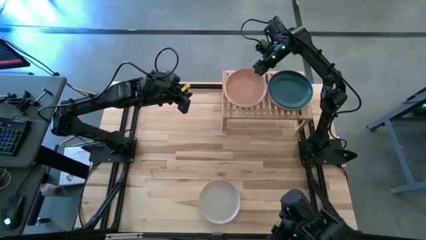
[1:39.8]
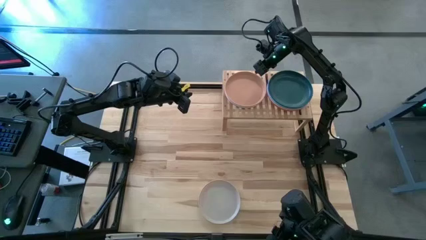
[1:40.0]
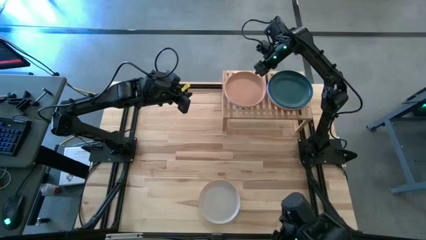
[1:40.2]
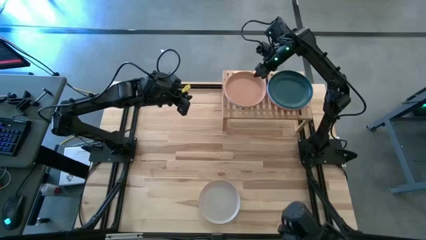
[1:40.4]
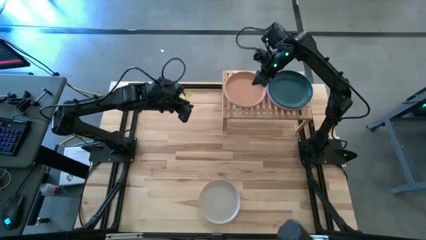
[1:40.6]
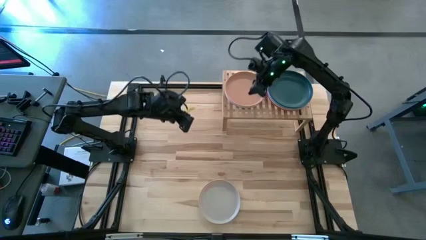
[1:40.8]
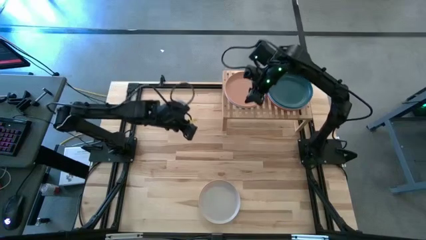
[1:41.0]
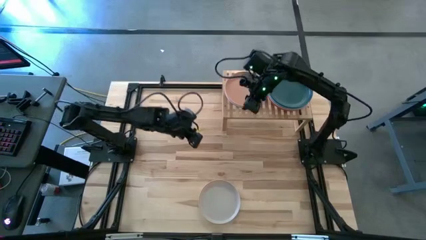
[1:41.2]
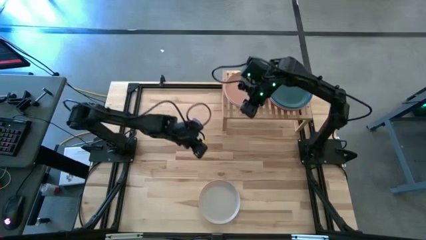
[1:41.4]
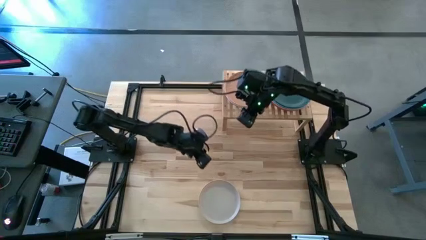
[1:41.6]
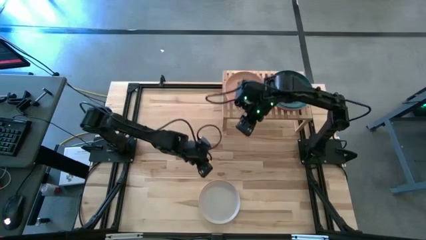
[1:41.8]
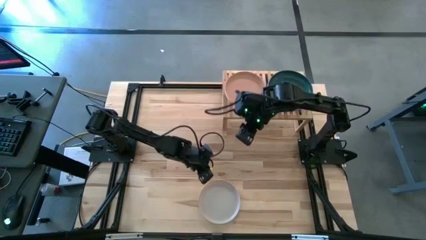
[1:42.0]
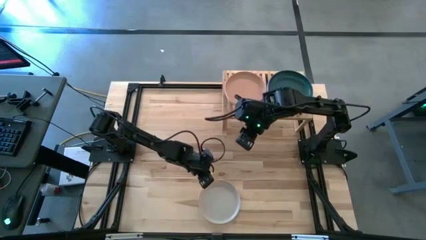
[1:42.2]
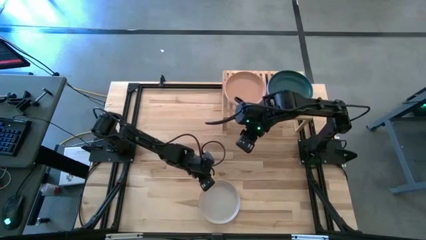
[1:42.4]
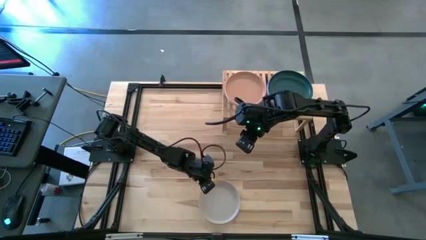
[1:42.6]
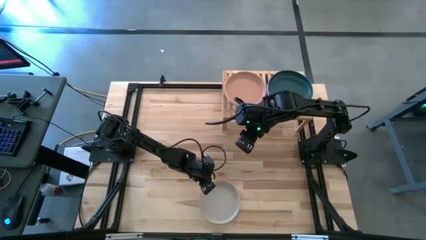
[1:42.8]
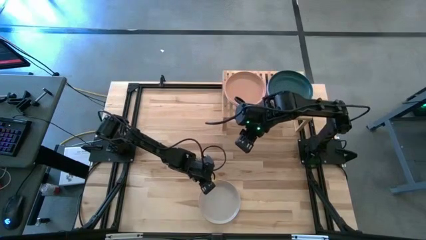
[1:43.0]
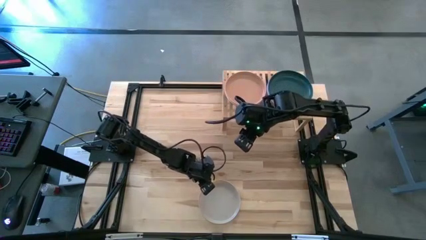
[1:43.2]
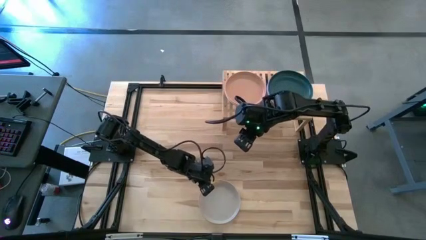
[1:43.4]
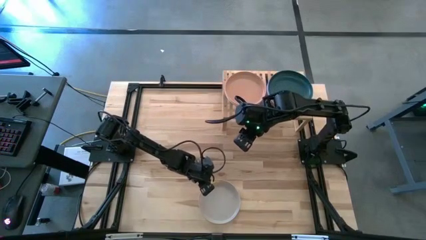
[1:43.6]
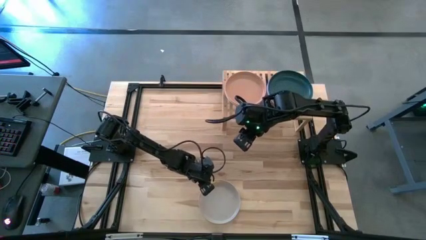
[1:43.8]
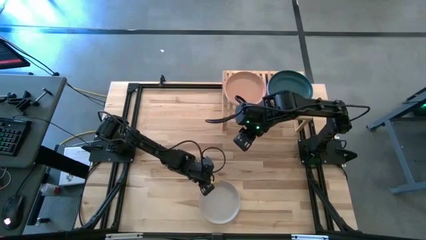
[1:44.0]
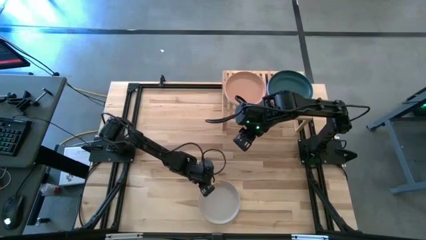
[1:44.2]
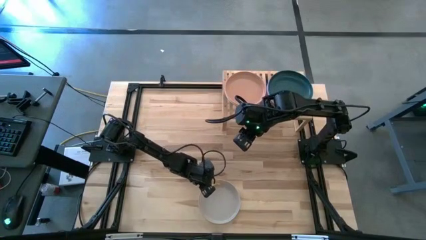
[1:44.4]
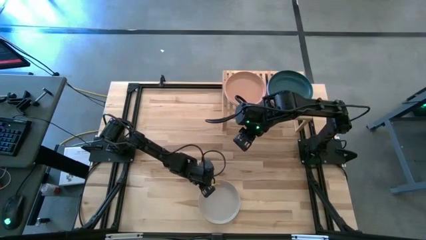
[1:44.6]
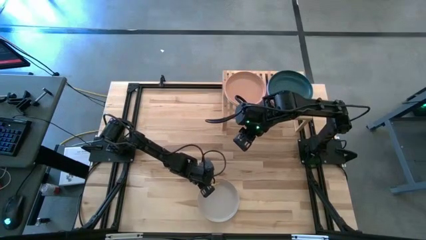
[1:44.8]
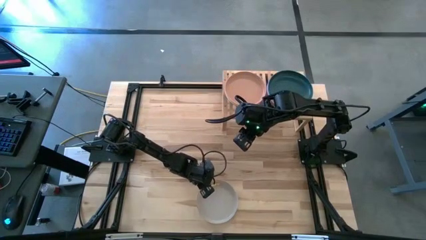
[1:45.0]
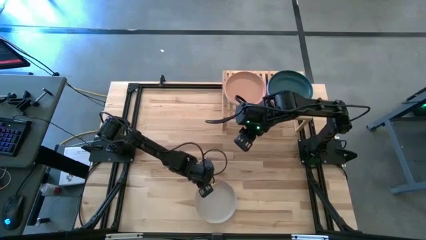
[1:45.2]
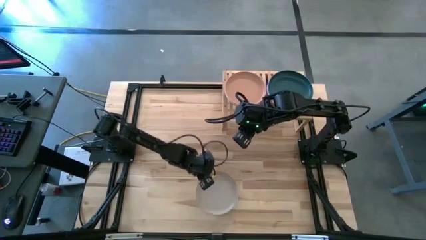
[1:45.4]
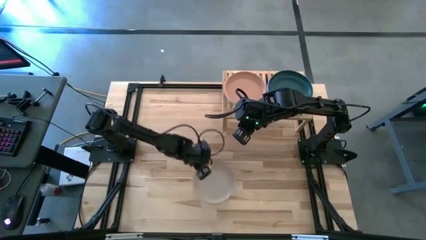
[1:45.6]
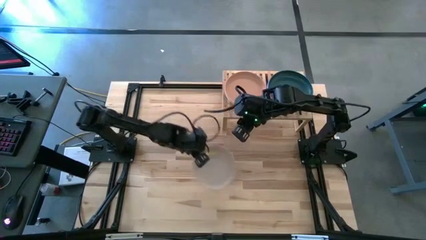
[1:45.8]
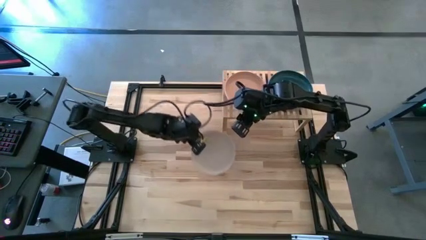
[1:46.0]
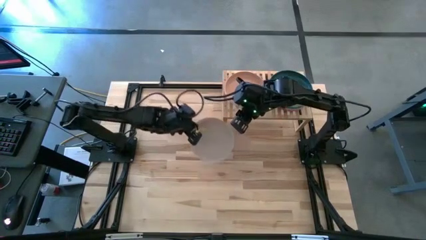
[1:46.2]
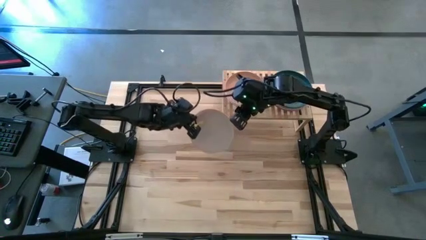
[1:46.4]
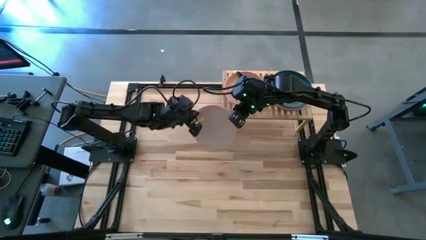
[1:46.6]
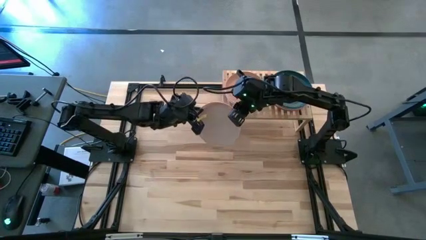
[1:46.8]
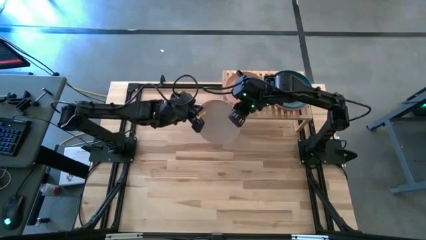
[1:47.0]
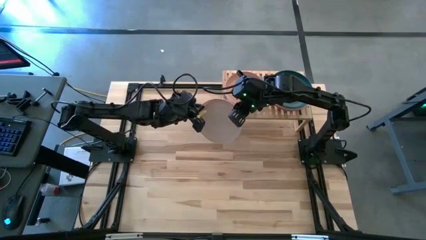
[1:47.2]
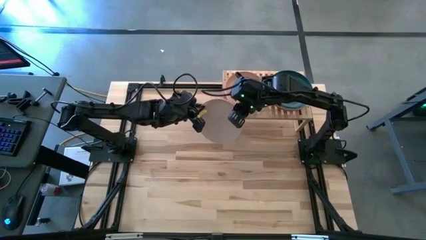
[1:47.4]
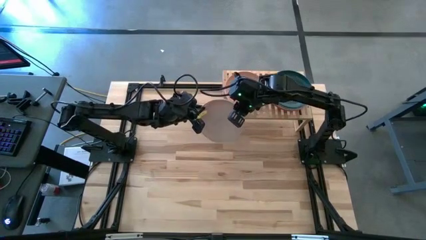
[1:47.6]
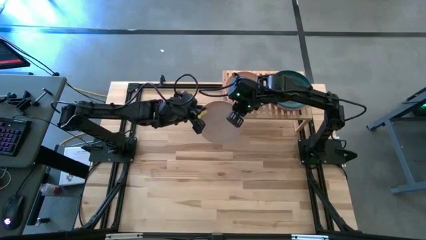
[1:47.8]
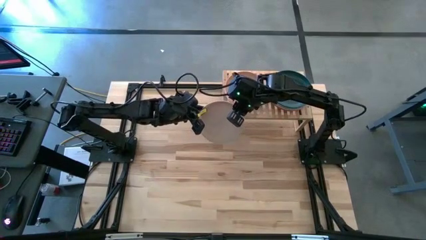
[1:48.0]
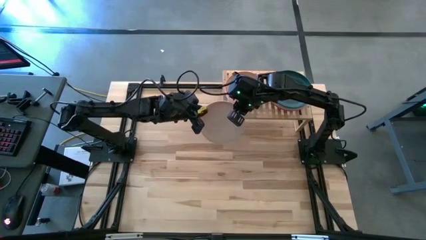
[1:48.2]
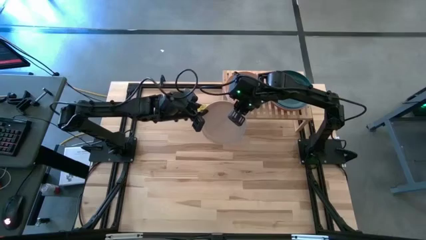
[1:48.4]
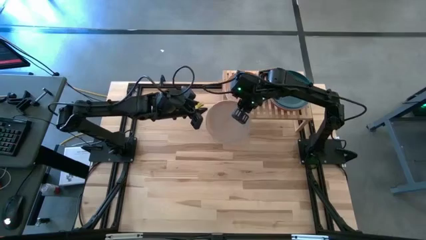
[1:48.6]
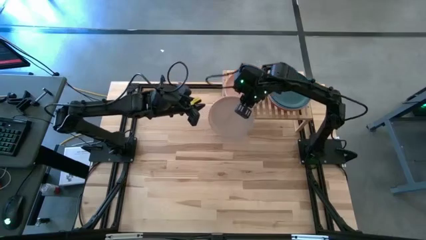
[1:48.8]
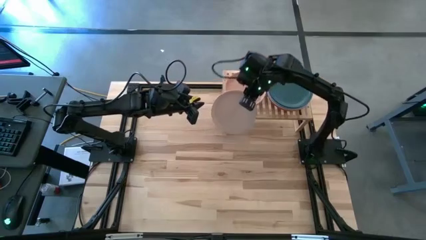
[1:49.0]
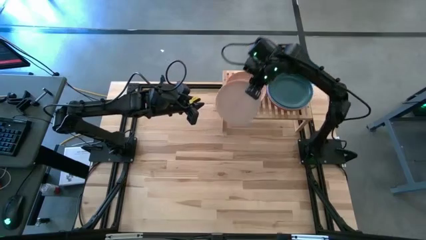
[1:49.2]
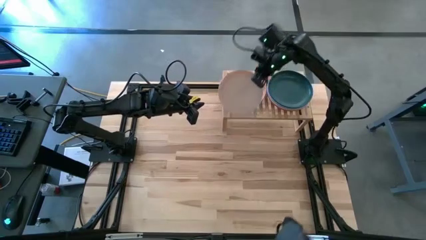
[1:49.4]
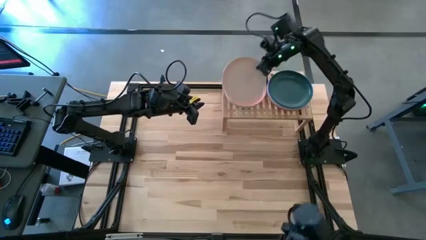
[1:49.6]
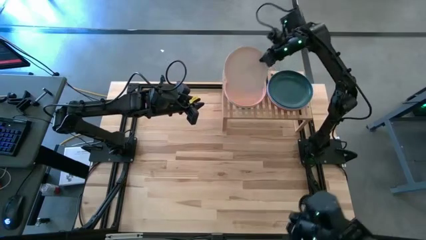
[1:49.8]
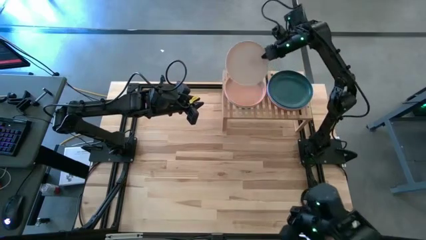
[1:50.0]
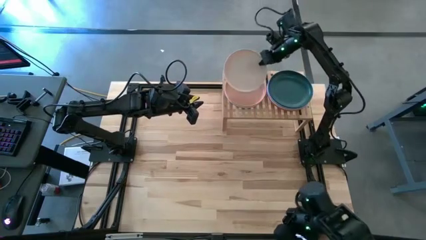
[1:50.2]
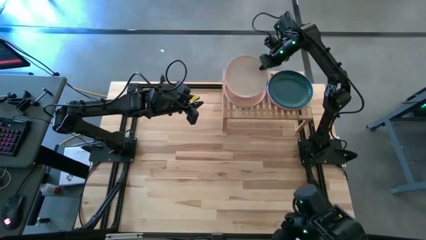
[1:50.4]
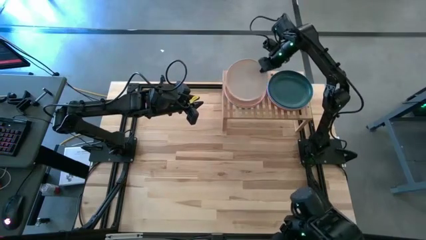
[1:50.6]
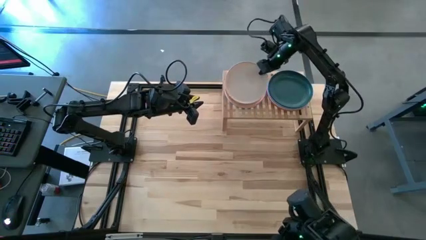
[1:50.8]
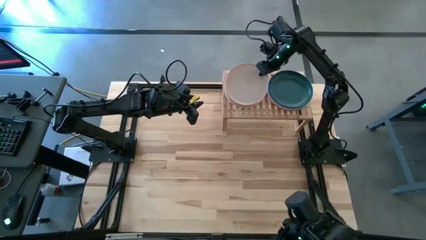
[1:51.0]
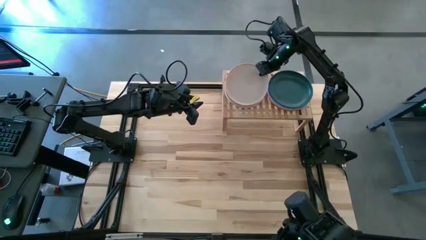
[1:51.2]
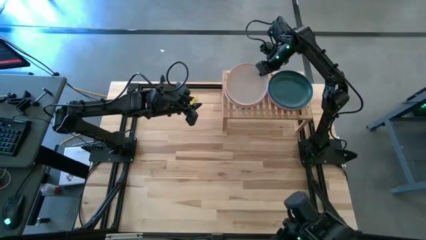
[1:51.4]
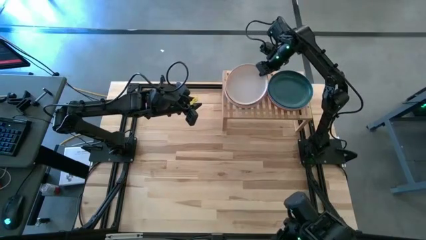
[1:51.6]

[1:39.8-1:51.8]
Task: Place and stack plates onto a shelf
Stack the white plate on top of the brown plate onto the shelf

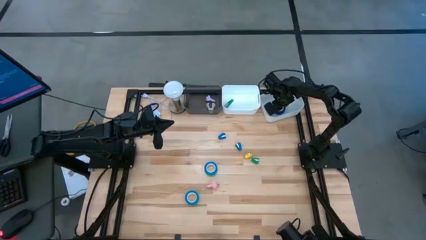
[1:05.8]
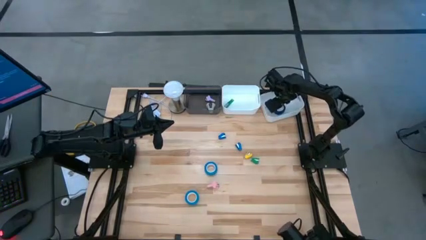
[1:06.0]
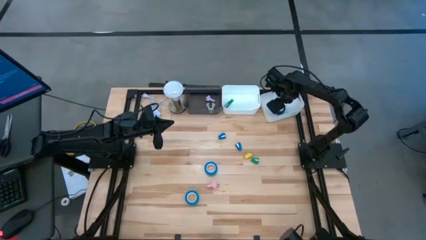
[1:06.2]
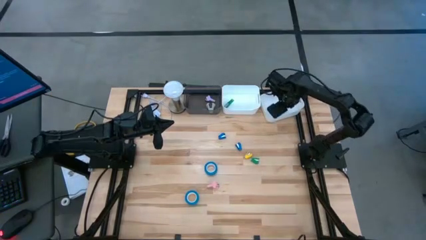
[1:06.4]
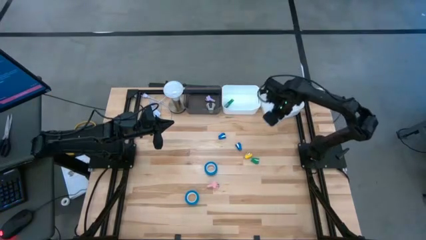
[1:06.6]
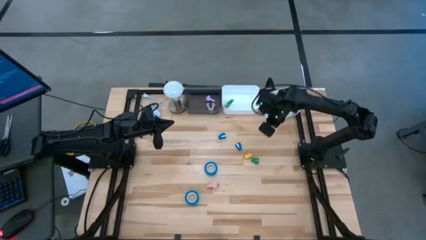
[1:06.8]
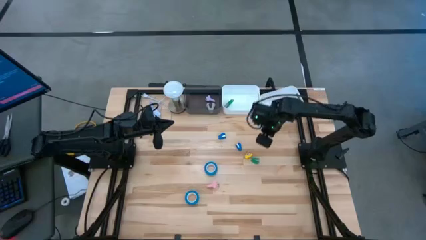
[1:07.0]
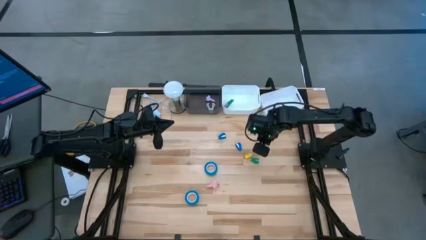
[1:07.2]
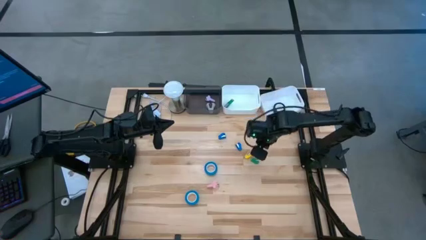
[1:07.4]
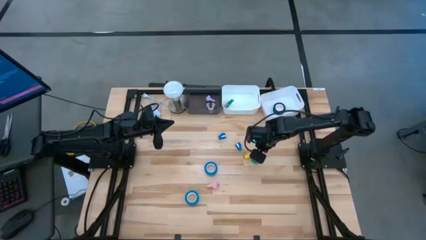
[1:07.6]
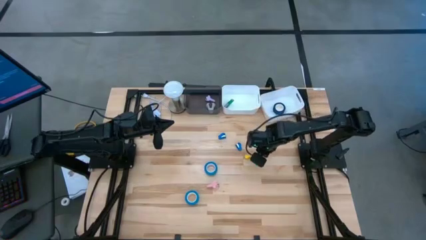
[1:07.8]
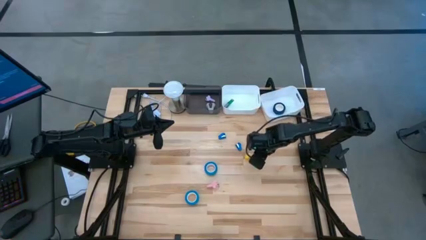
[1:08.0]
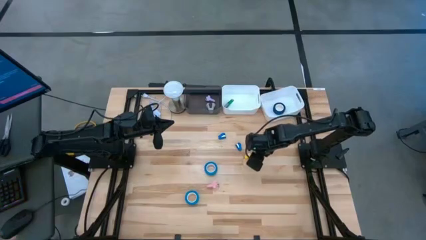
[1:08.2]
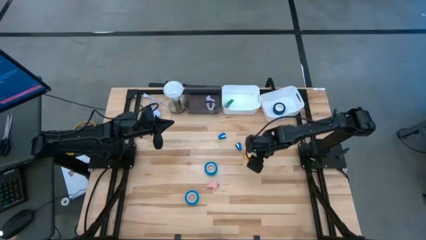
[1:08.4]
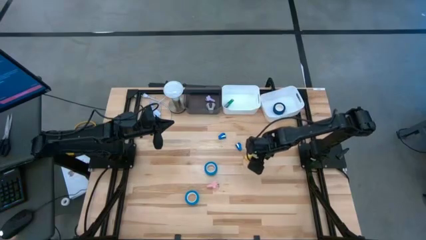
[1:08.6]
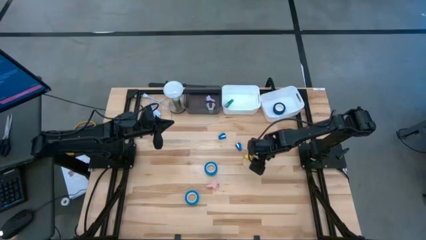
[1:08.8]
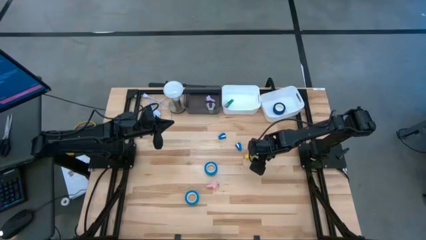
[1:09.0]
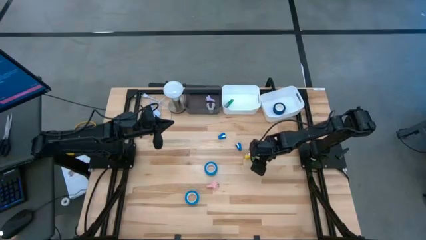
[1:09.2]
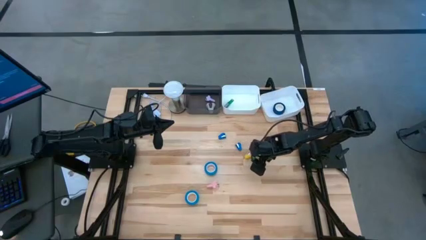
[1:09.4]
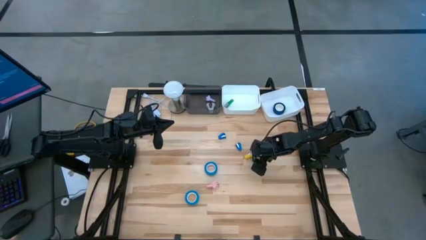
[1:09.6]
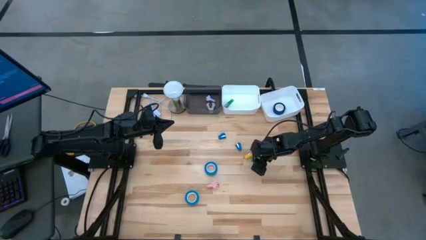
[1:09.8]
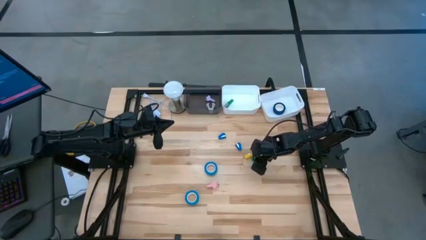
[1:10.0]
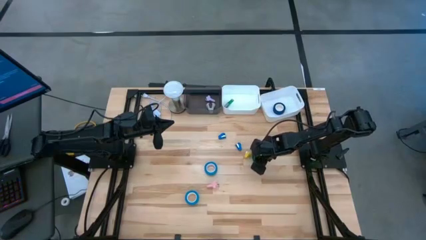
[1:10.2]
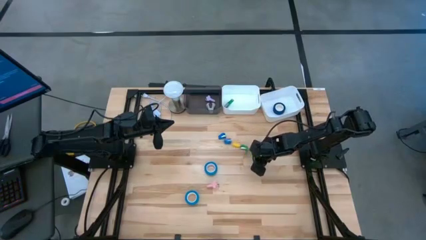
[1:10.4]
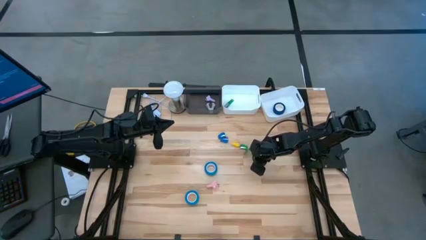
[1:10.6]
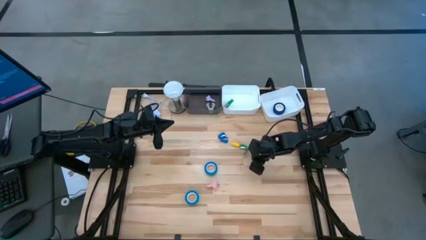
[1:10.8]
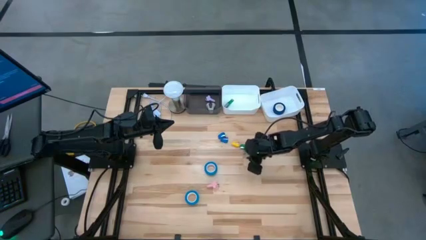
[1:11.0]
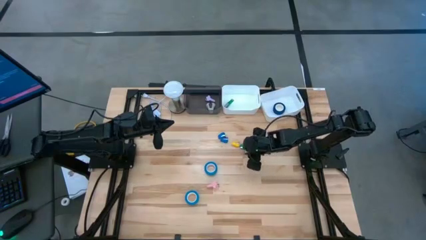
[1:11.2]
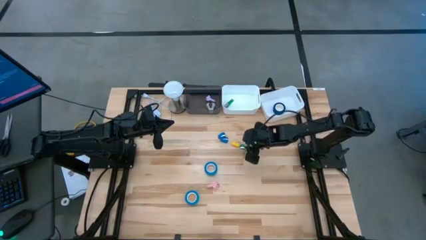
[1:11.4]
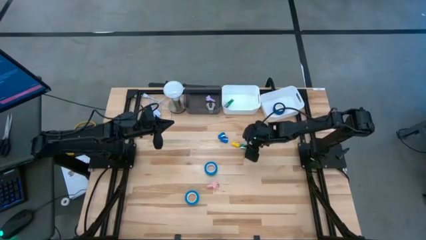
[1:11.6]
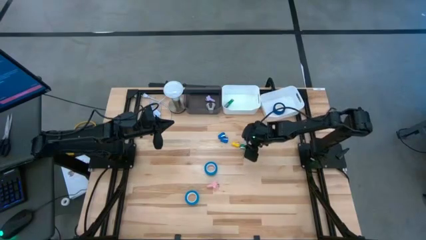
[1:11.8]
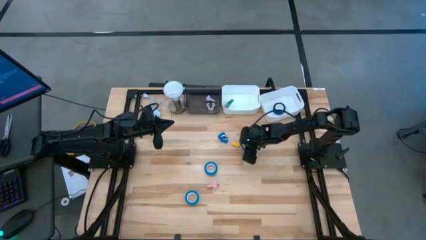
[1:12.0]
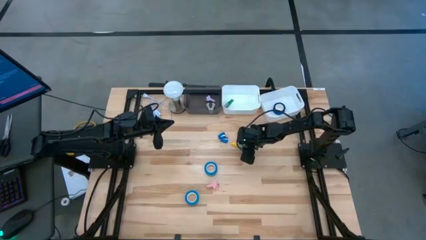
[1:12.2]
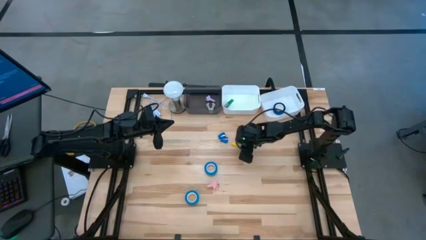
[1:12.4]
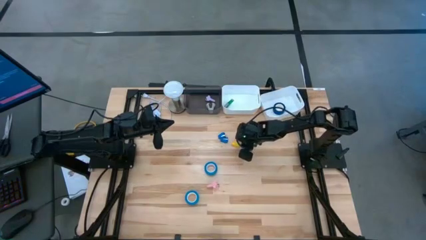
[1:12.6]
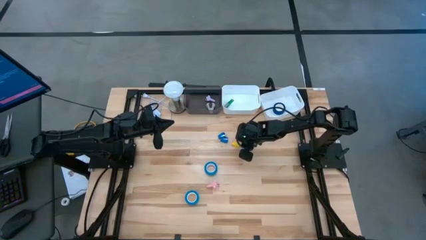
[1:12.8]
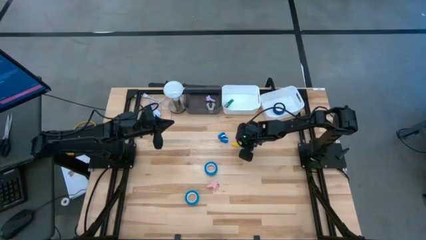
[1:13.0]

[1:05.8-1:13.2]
Task: Pick and place Stapler, Stapler remover, tape
Put the green stapler into the left white bin
